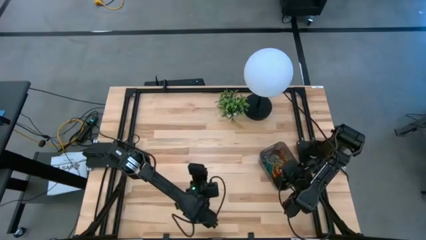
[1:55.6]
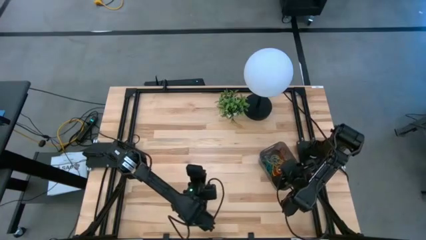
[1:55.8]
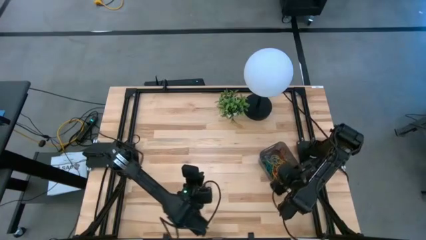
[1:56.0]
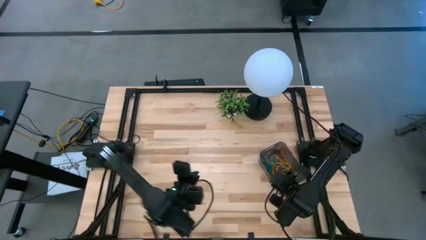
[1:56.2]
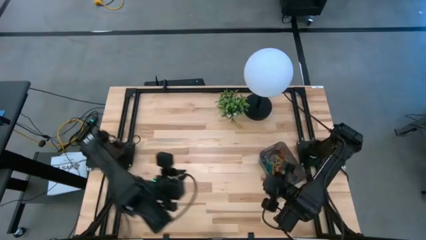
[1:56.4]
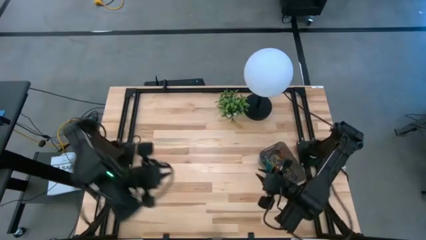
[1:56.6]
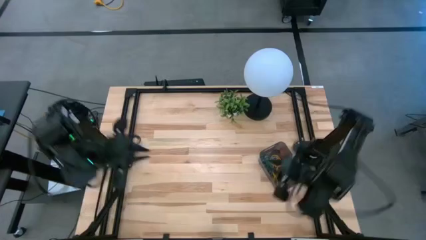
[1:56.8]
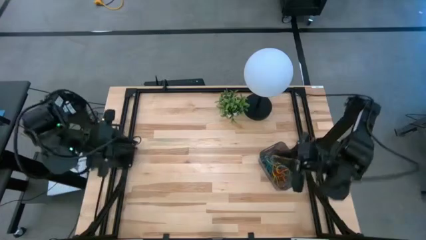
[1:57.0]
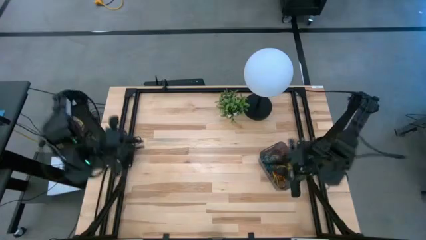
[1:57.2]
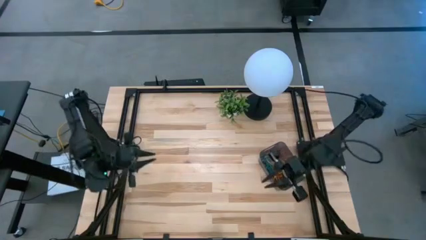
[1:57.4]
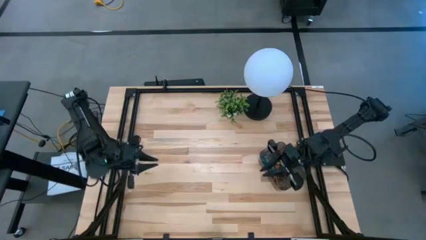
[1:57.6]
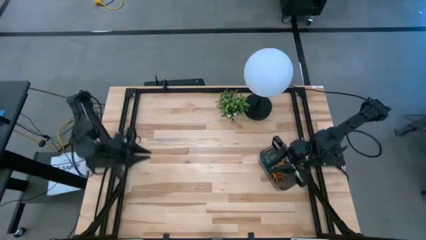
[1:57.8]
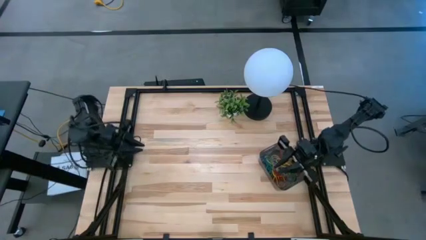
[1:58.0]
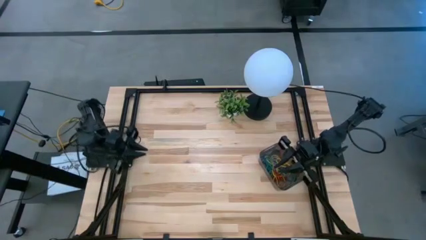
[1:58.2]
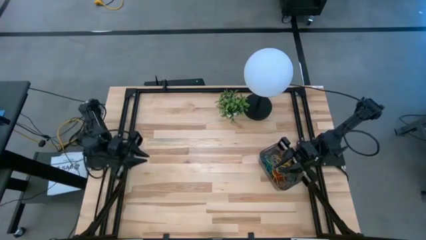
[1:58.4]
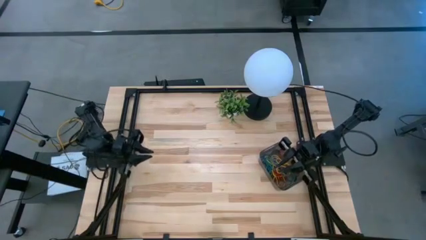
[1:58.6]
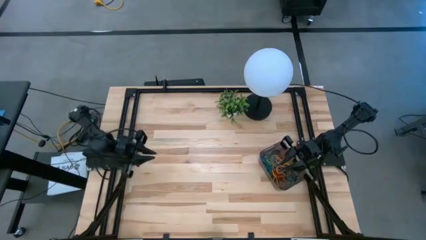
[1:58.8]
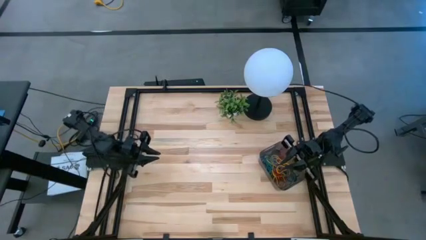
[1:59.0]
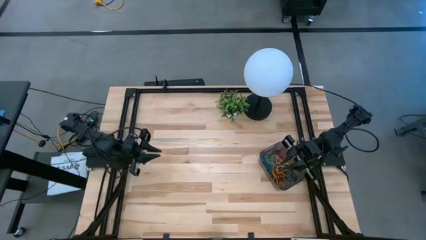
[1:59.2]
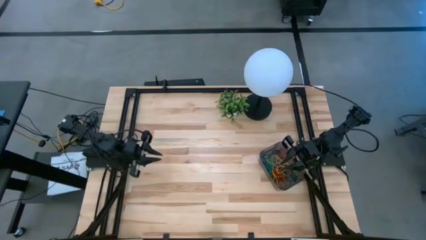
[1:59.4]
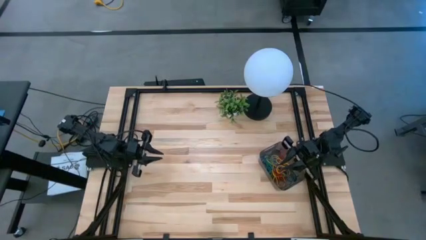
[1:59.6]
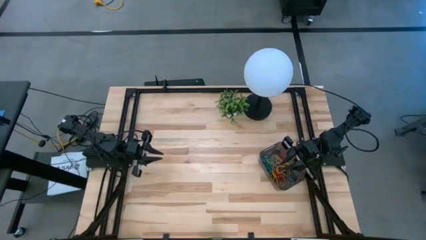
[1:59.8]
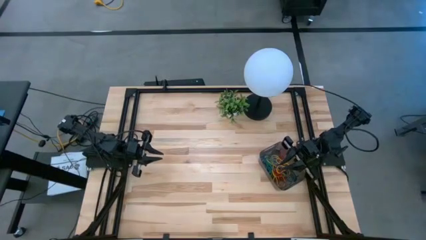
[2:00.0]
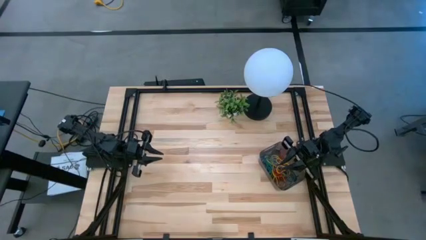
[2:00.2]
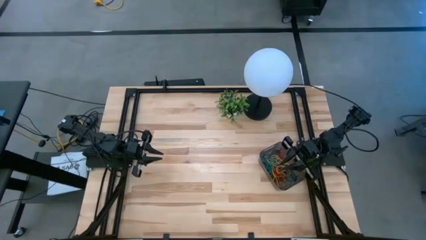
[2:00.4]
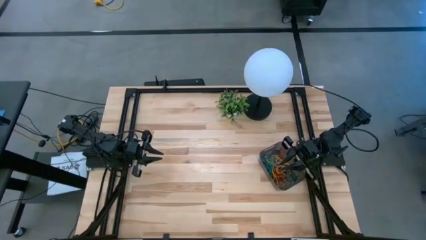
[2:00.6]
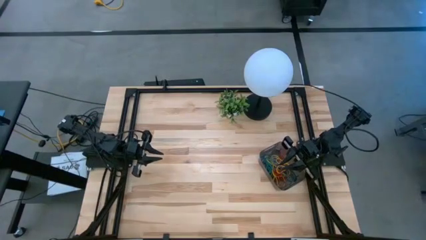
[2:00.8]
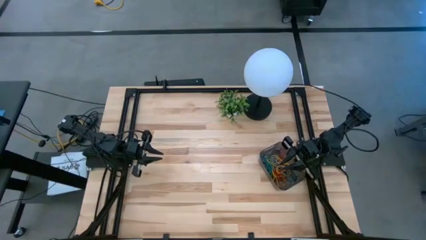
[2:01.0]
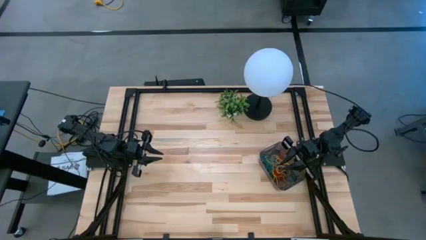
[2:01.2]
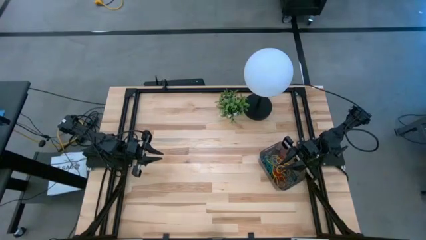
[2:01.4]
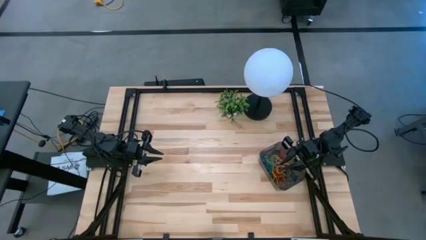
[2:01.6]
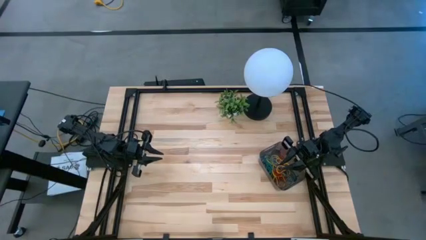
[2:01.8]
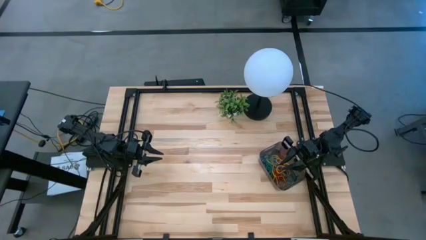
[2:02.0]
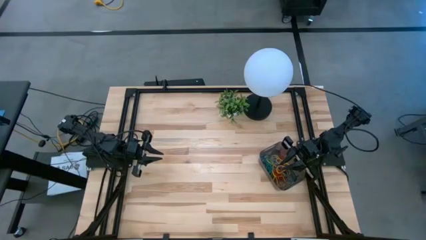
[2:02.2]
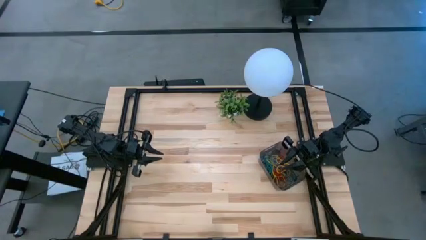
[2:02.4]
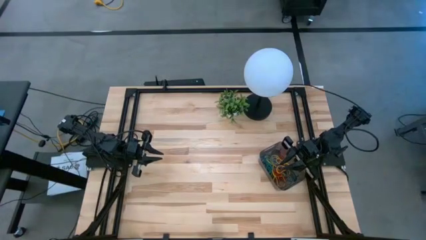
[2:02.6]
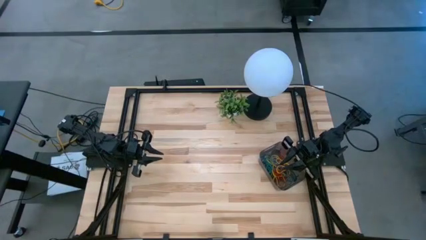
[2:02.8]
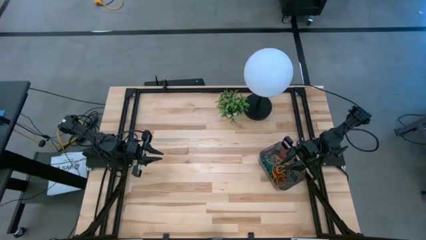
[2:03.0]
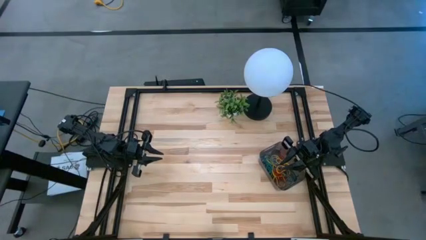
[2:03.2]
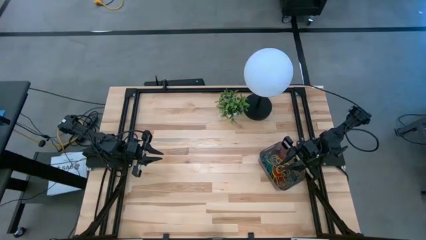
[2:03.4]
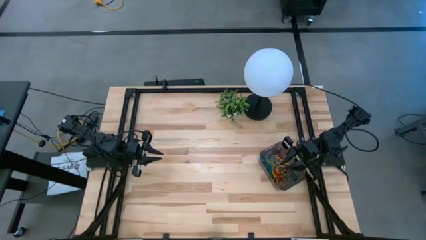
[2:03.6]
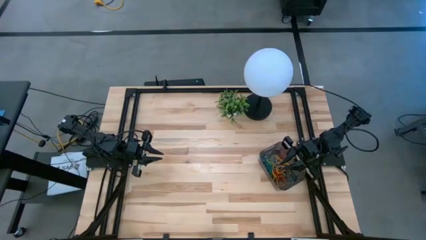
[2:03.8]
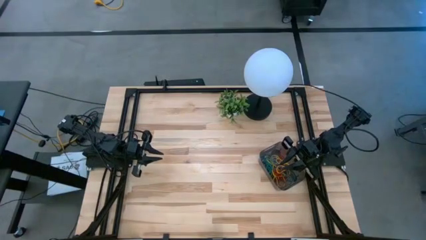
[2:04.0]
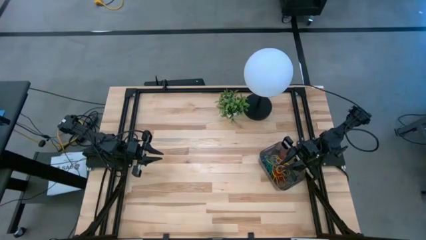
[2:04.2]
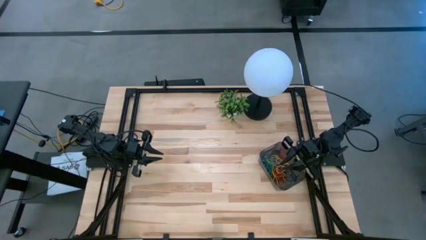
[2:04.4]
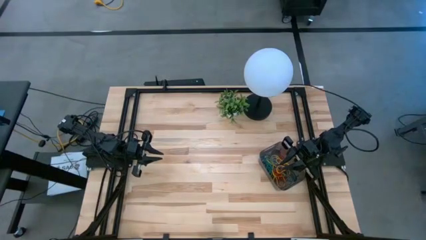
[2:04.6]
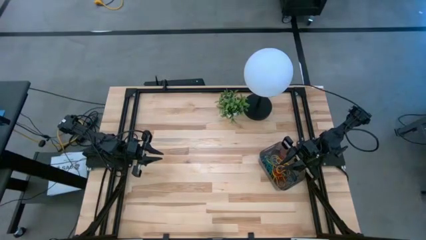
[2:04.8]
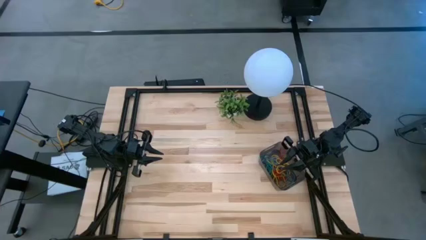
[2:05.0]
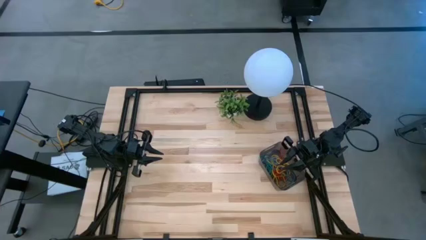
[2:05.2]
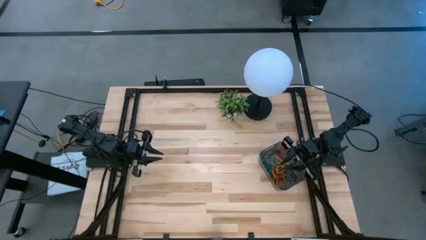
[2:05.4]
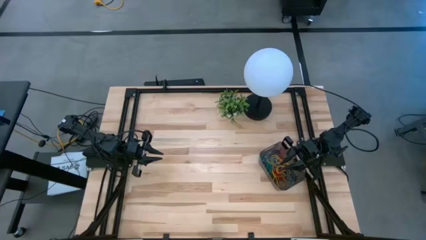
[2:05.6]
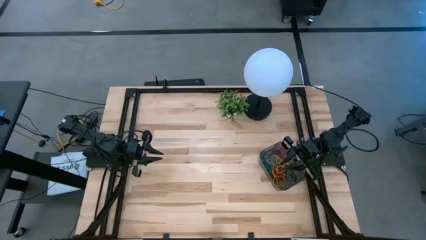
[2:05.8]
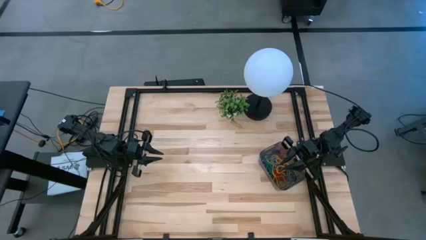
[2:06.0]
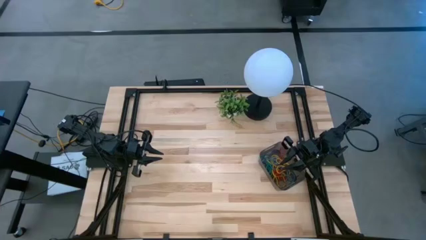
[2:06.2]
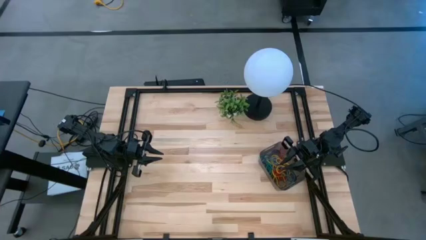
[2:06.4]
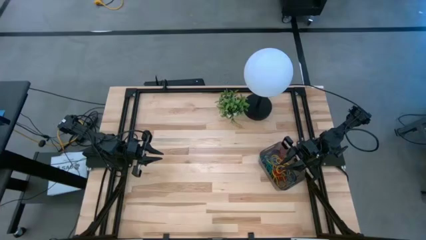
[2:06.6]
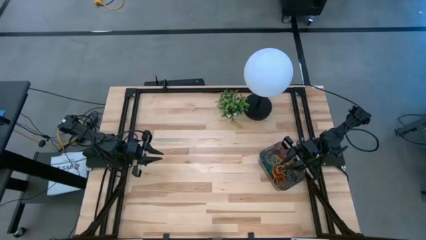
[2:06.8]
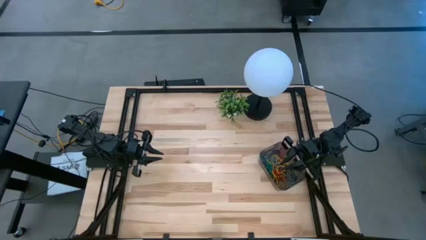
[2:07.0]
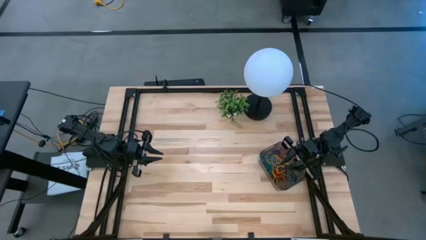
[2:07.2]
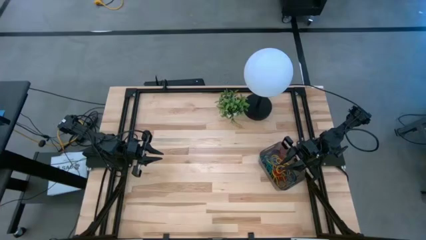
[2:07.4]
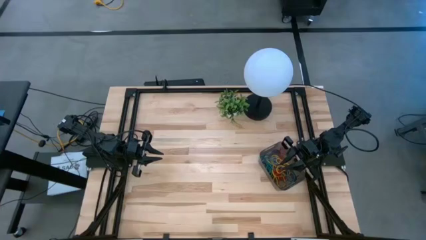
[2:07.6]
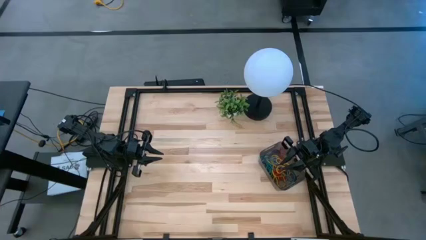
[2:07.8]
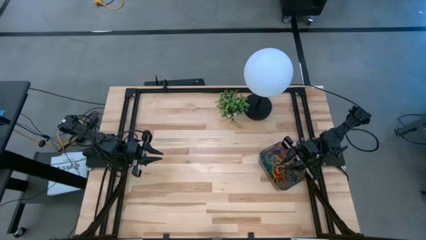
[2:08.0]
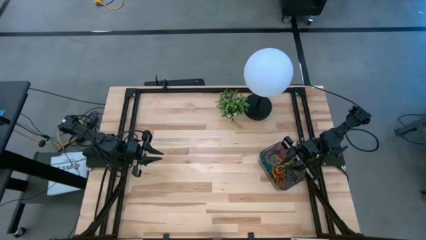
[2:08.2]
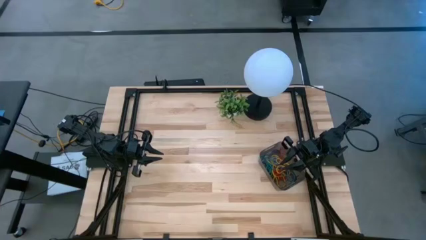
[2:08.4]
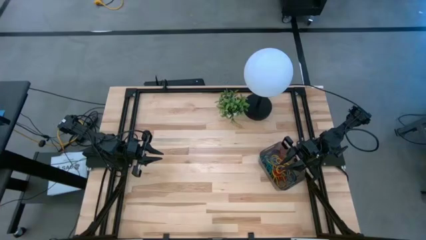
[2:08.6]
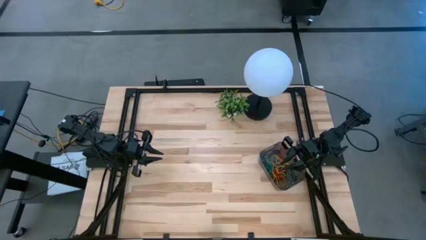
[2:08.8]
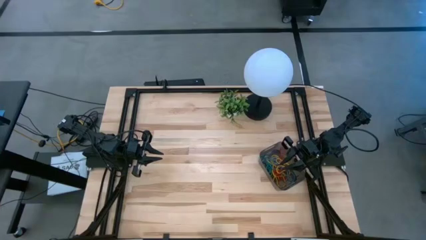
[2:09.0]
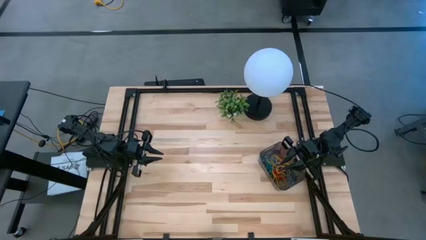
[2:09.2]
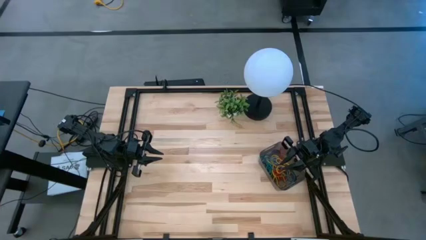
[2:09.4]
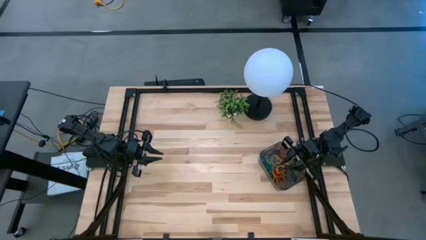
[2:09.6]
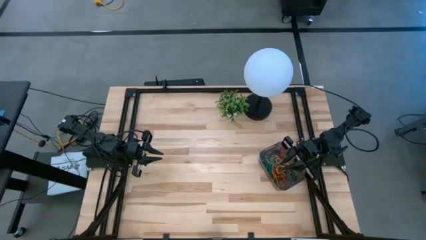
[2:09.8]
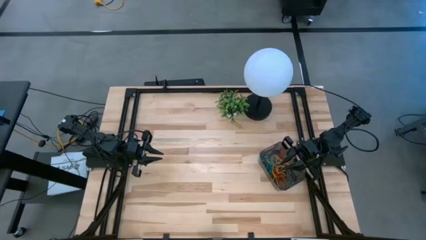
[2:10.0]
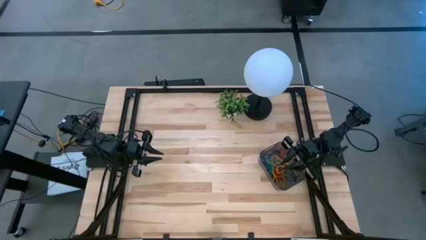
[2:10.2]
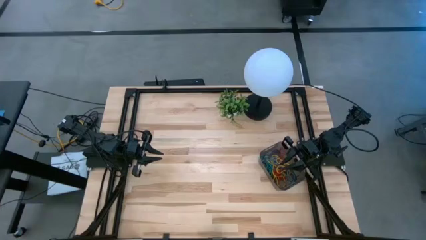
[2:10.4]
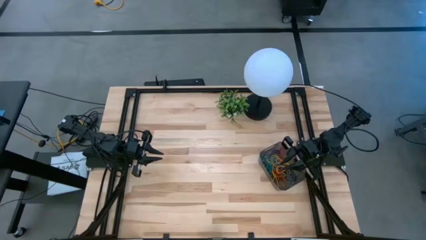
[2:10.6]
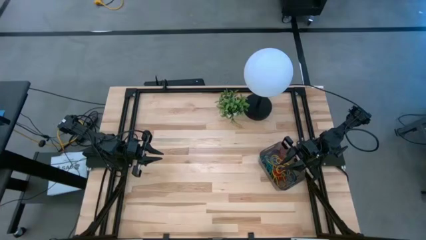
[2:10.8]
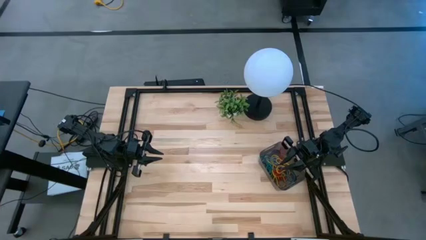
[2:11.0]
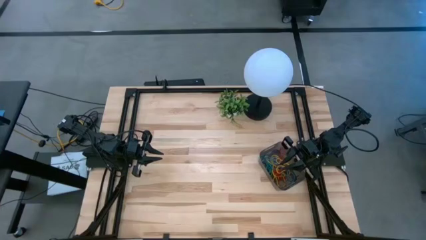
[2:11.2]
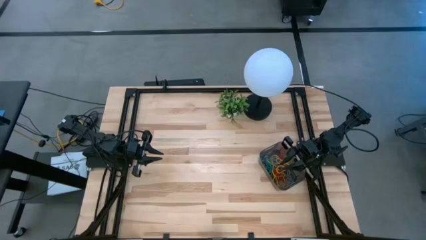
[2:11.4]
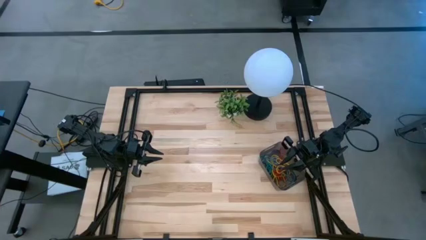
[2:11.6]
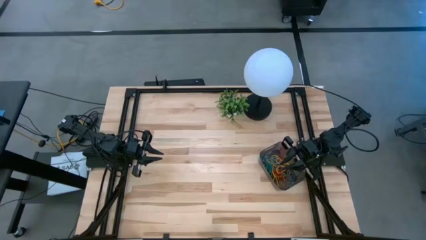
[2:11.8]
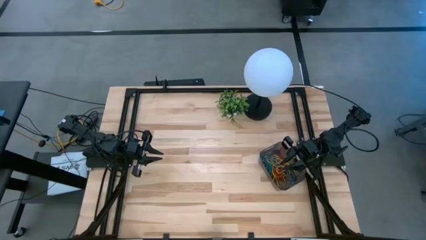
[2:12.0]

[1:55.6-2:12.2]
Task: Pick and place items into bin
Return to Home Position
